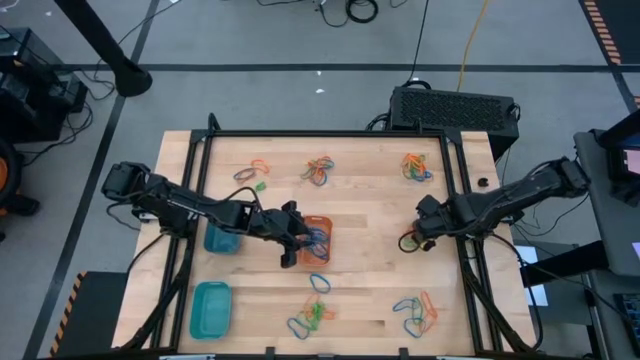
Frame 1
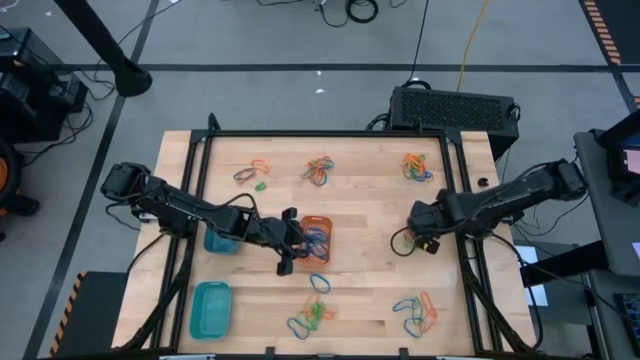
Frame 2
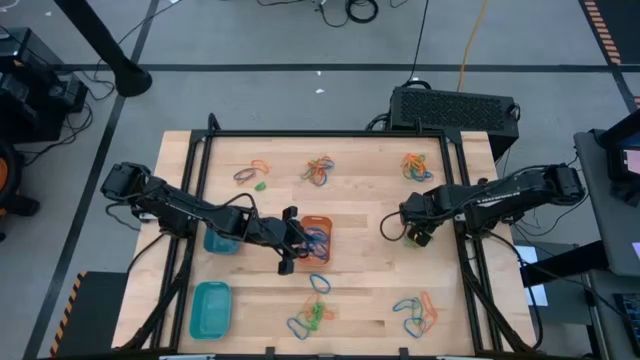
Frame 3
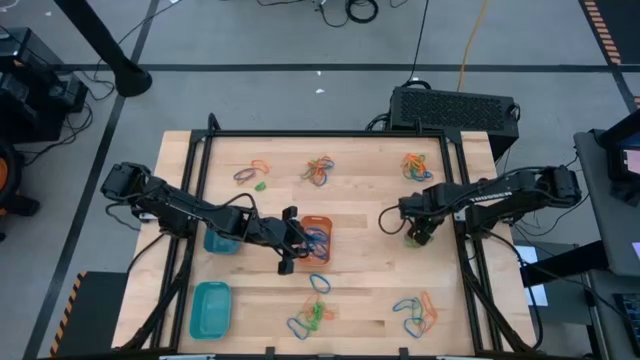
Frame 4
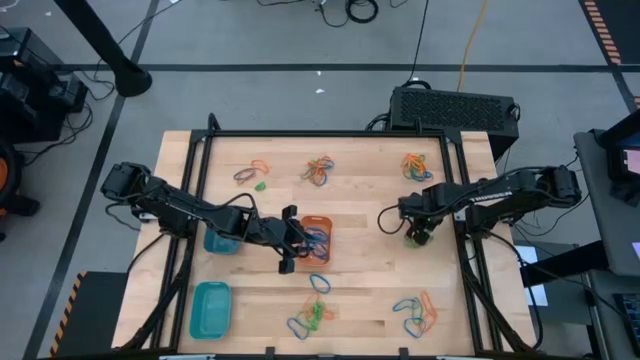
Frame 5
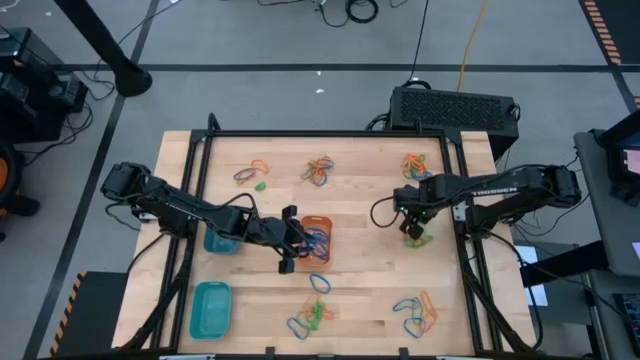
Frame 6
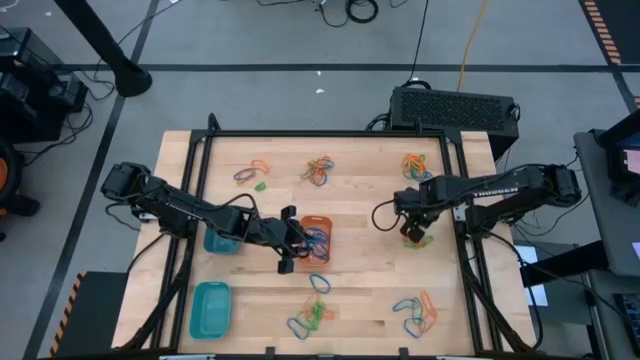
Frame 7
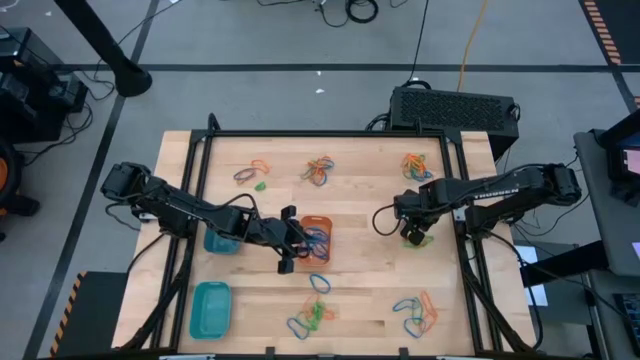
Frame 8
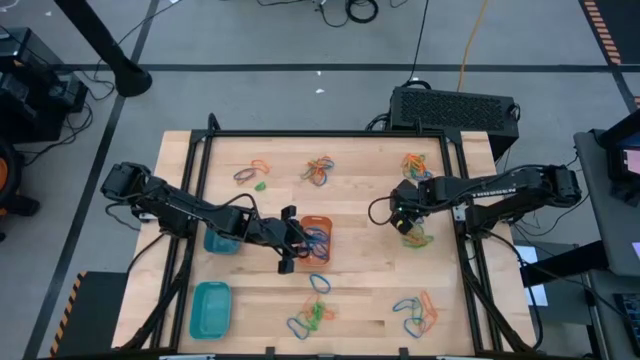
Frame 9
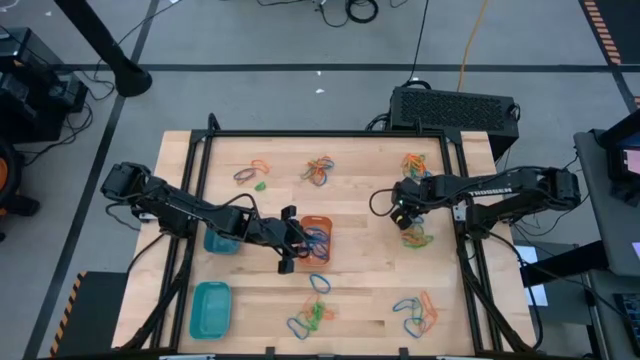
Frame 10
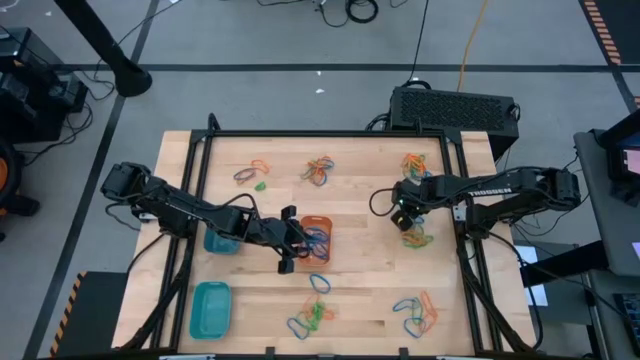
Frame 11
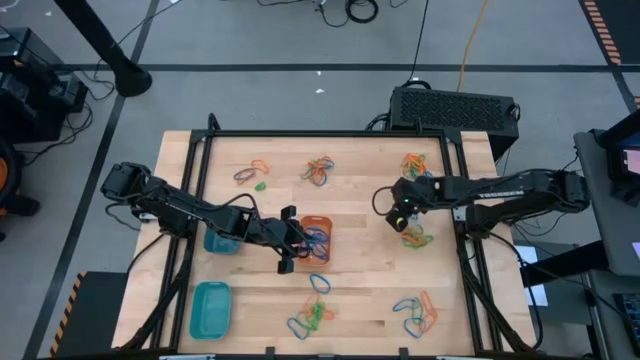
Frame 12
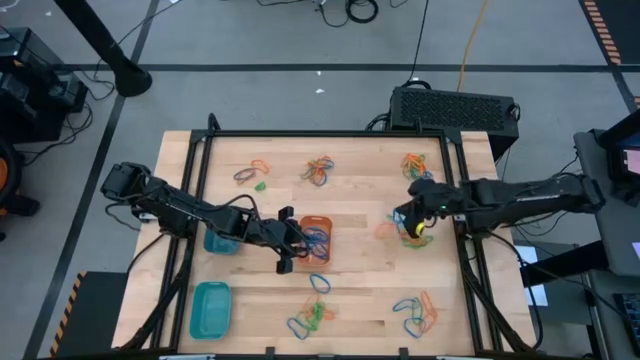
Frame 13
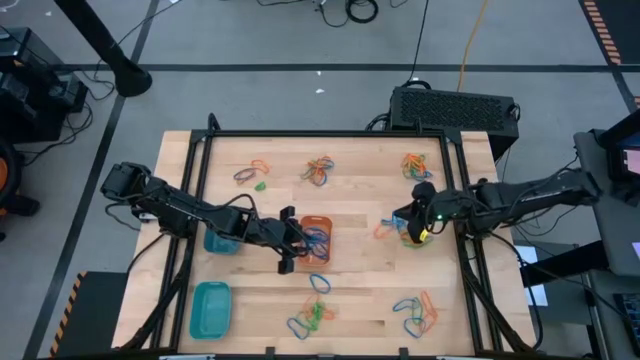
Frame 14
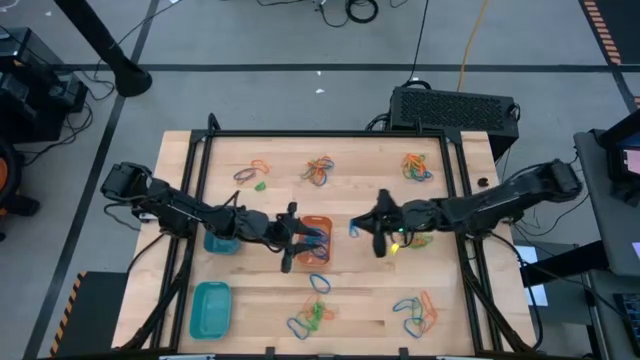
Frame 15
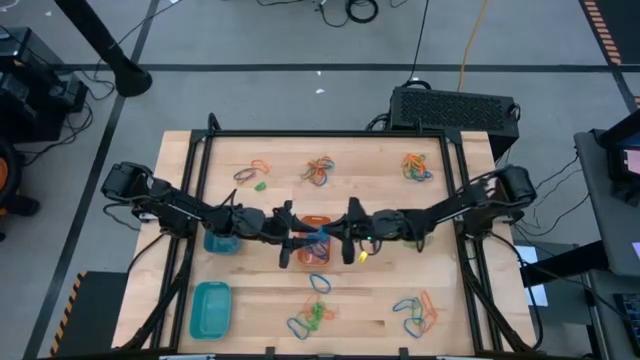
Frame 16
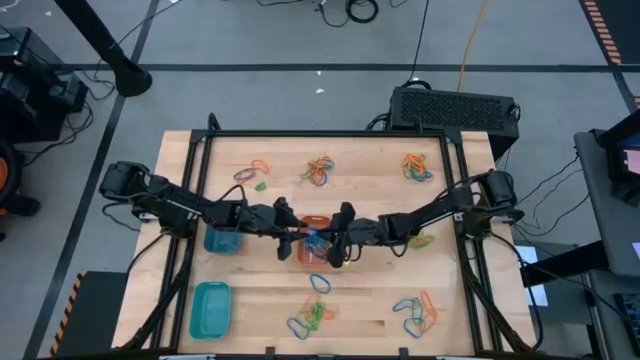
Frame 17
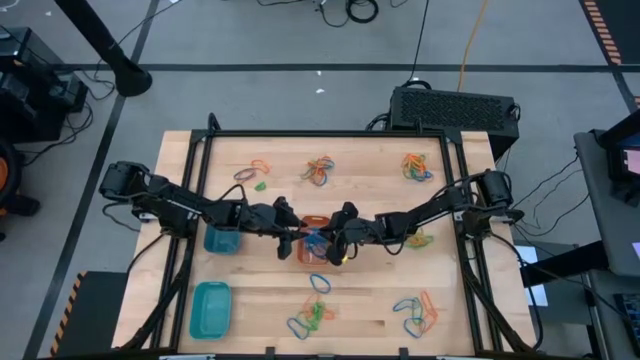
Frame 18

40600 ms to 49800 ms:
Task: Sort rubber bands into baskets
Put the blue rubber band into the orange bin

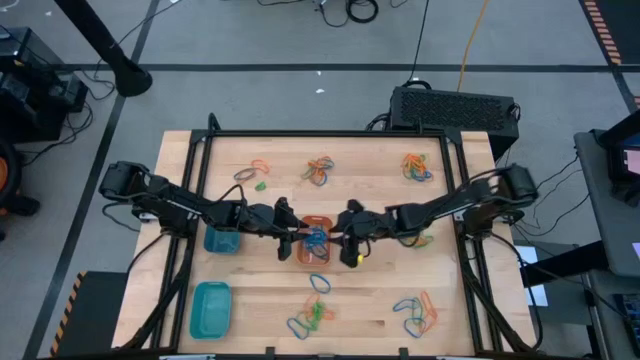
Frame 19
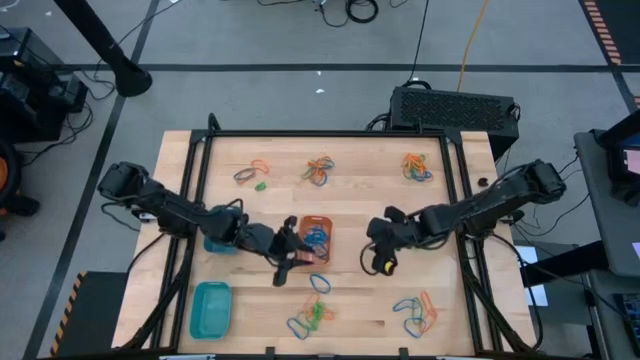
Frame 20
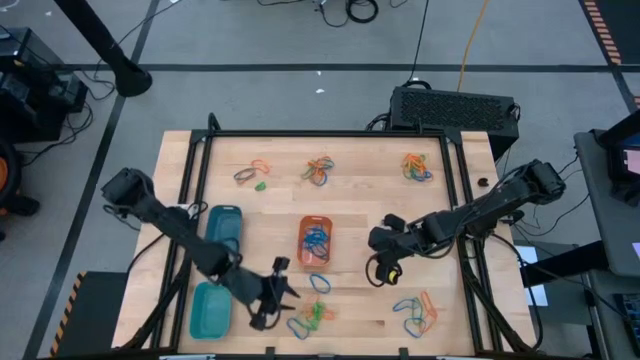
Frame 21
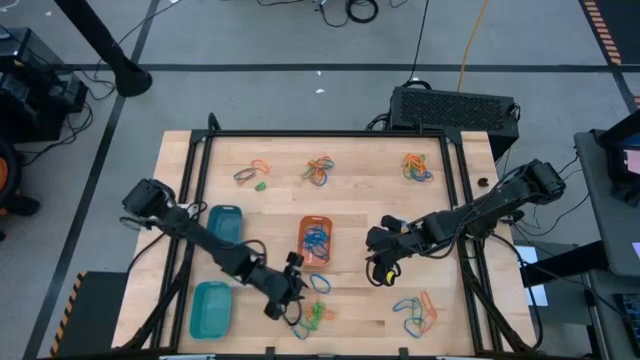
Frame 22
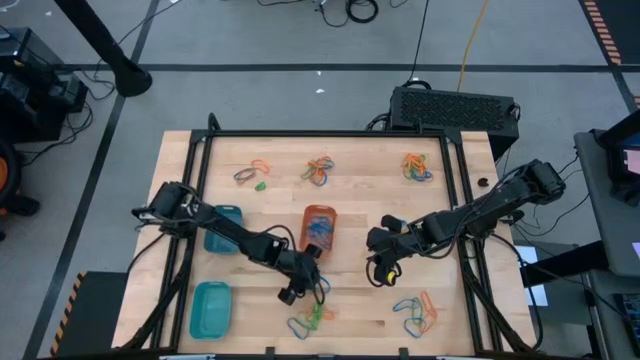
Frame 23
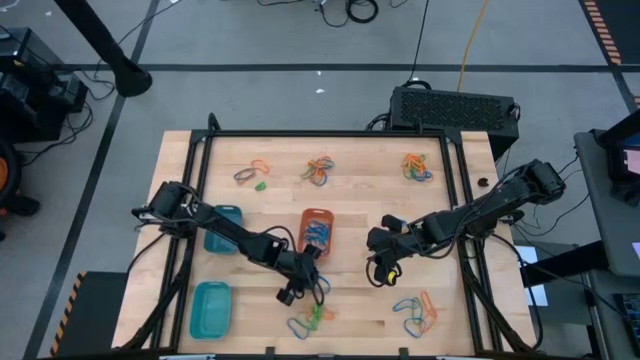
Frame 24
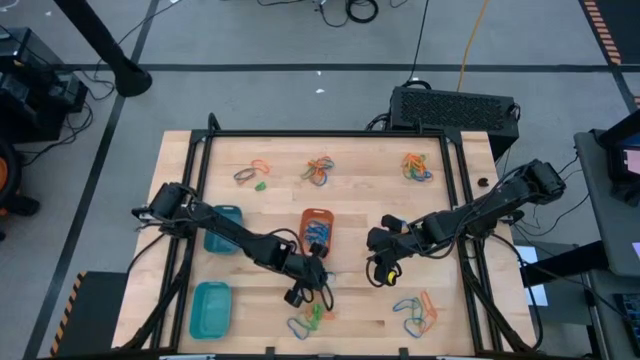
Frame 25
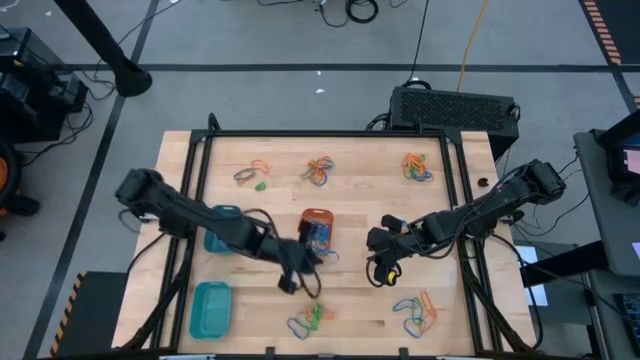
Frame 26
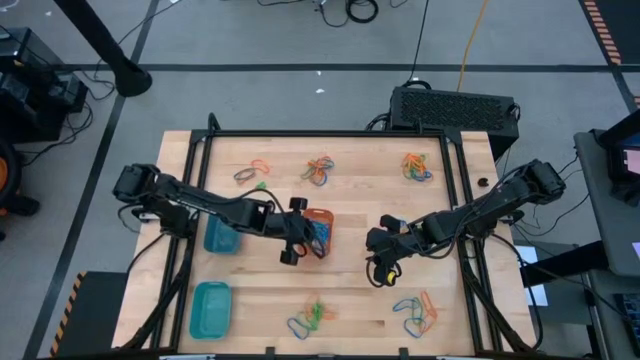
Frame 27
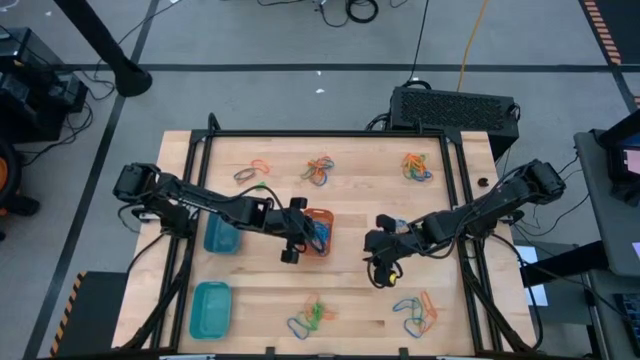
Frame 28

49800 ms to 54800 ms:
Put the blue rubber band into the orange bin

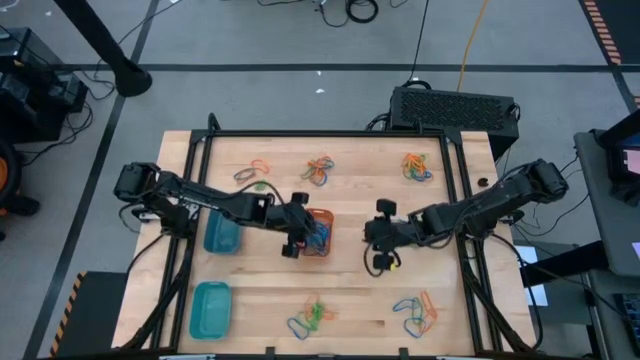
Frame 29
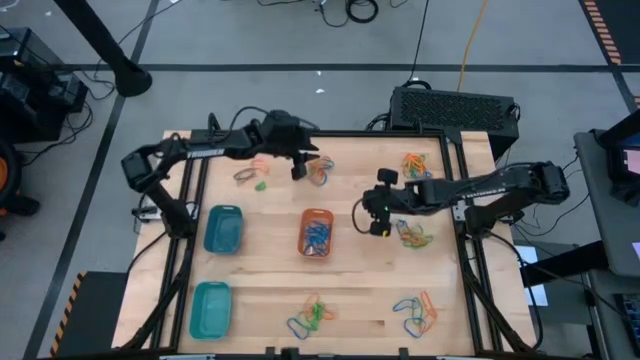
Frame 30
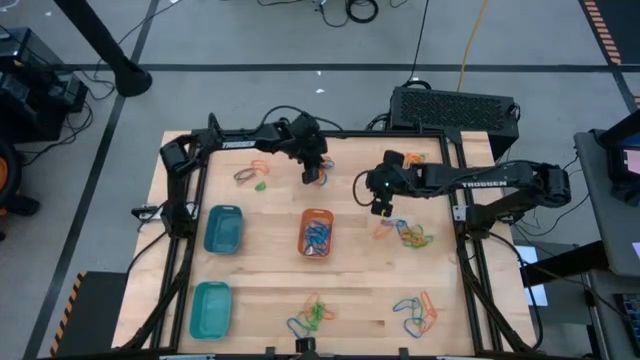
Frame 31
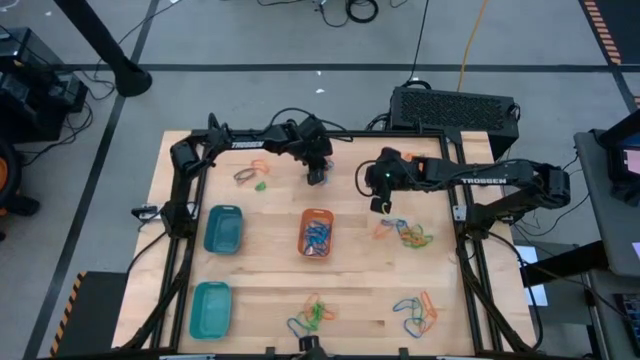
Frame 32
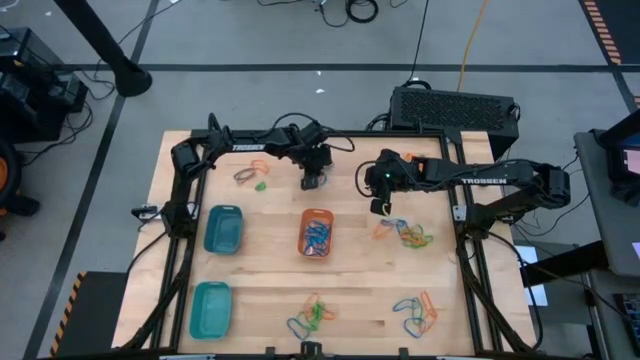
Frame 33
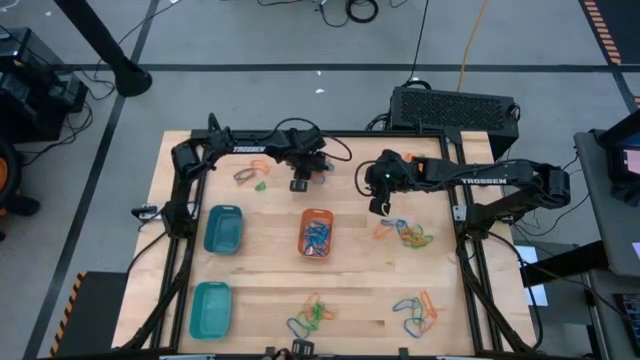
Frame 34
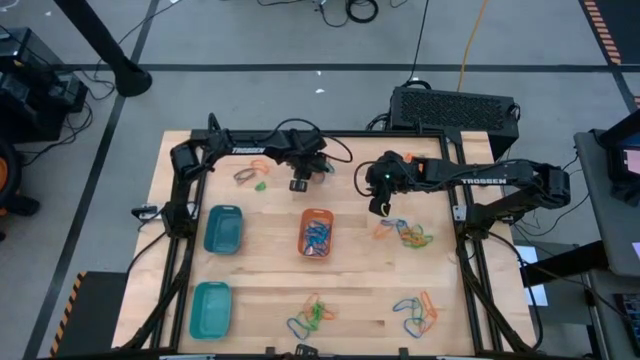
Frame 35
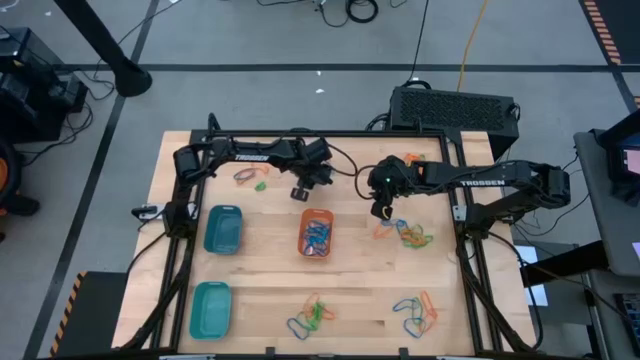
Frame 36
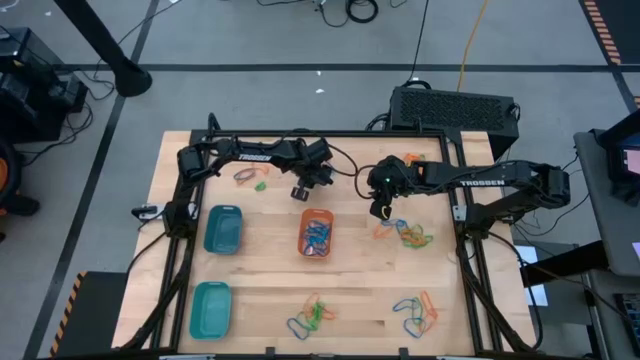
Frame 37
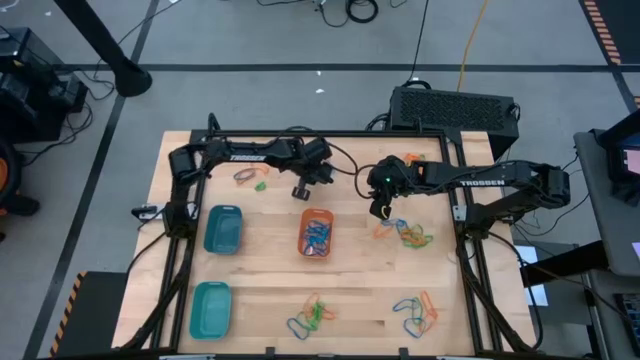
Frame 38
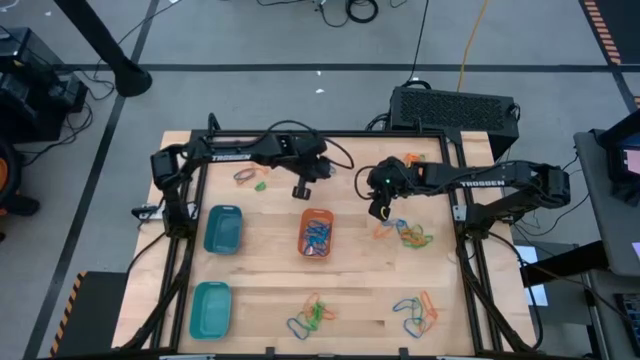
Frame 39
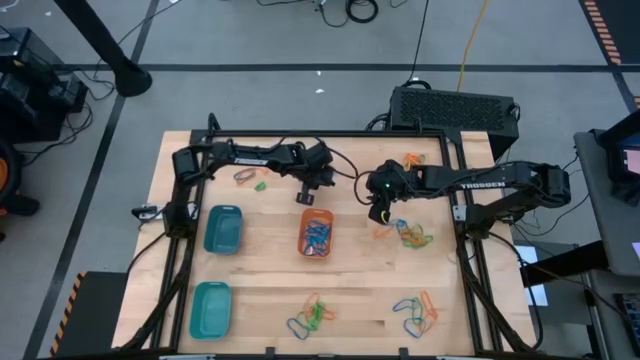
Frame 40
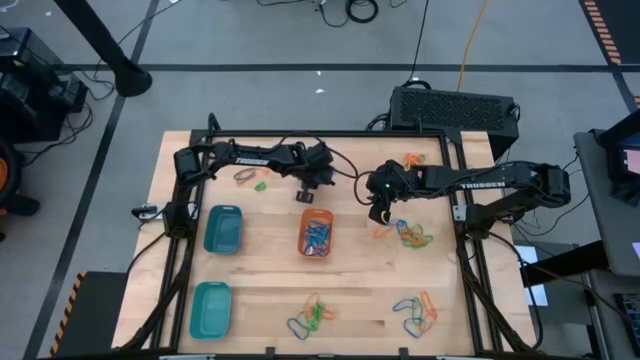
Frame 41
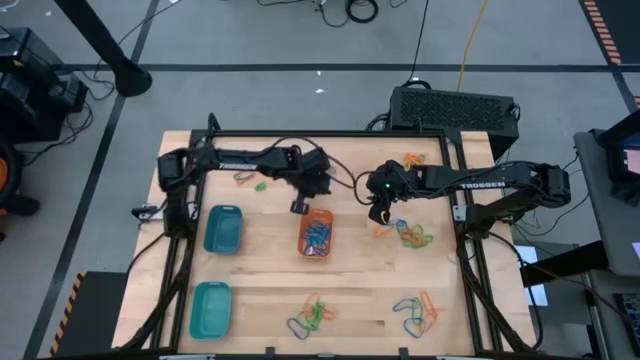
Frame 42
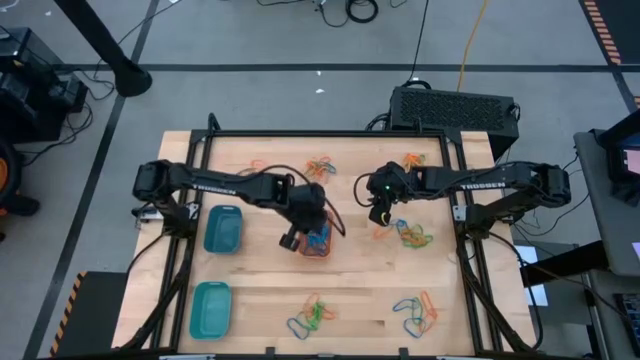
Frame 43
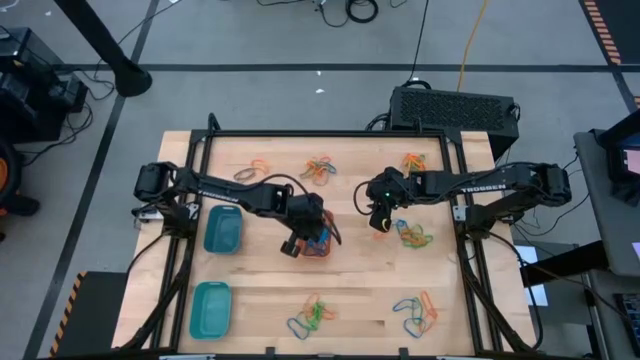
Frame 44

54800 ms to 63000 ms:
Put the blue rubber band into the orange bin
